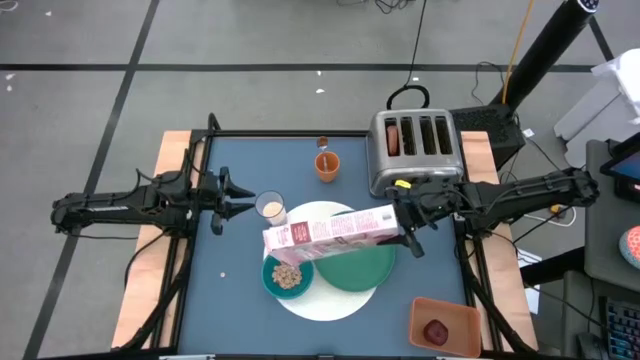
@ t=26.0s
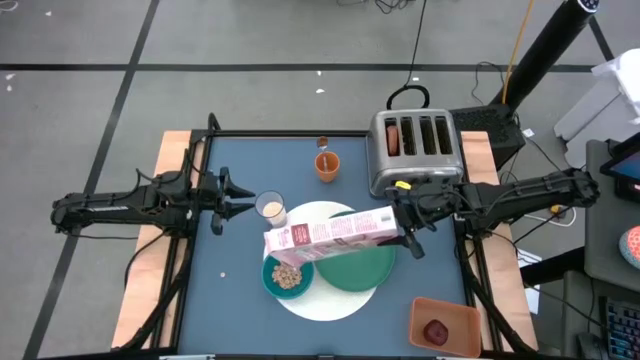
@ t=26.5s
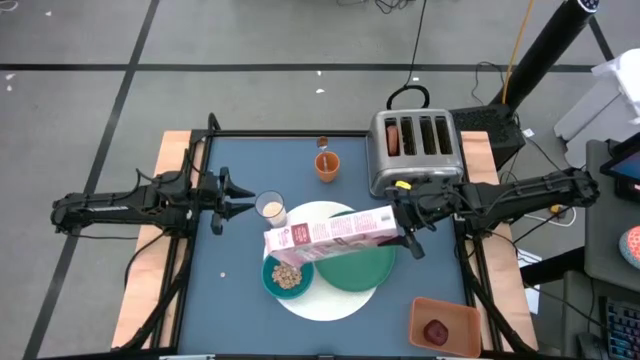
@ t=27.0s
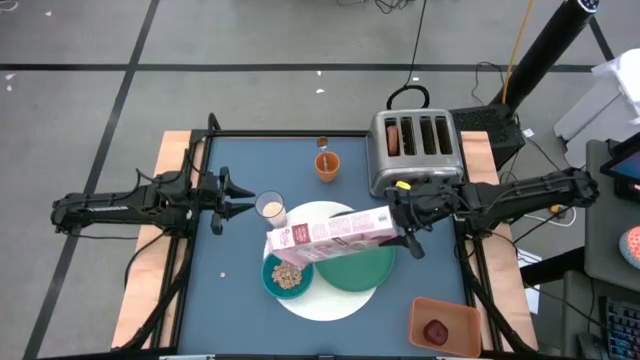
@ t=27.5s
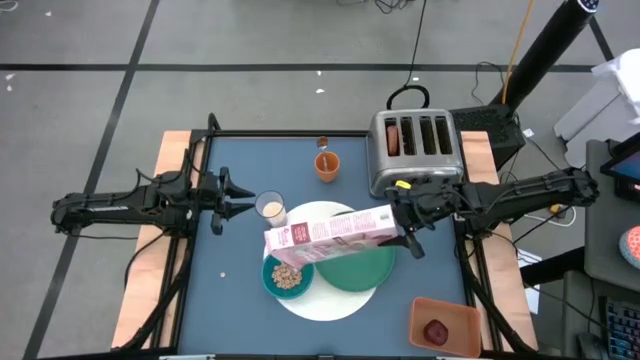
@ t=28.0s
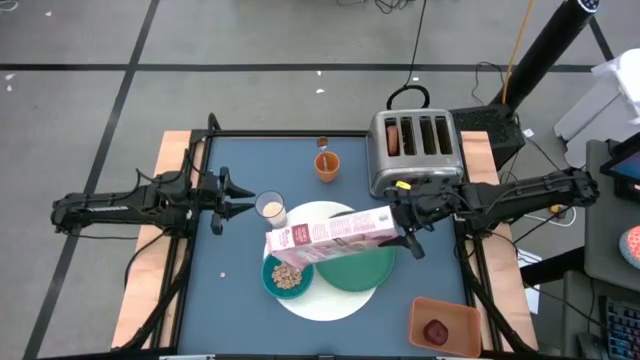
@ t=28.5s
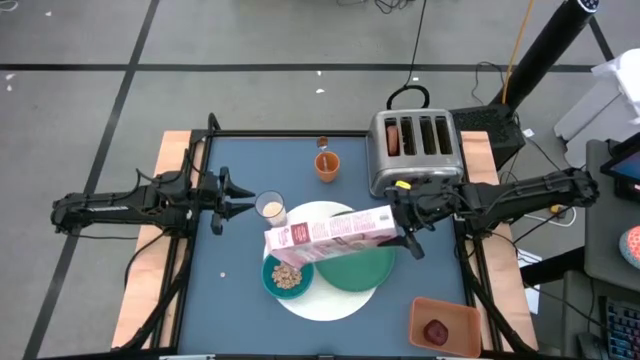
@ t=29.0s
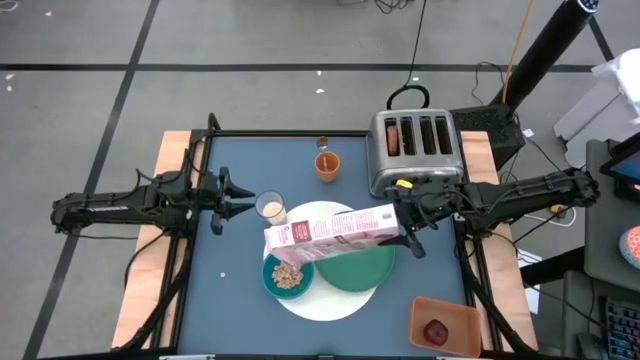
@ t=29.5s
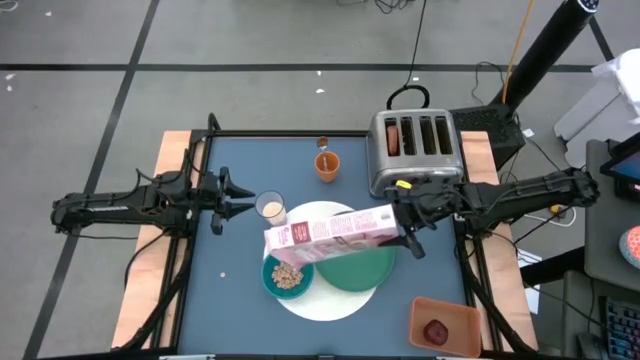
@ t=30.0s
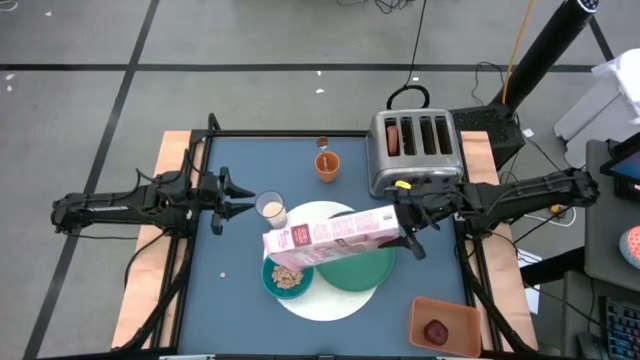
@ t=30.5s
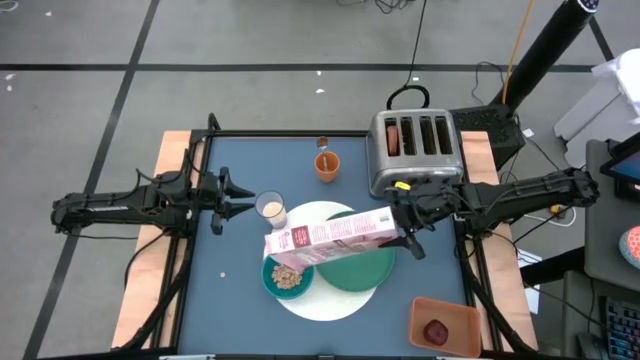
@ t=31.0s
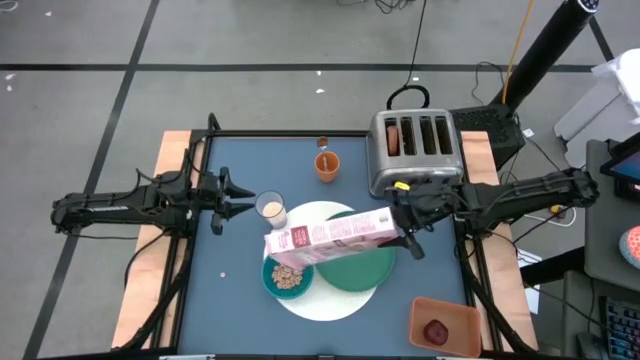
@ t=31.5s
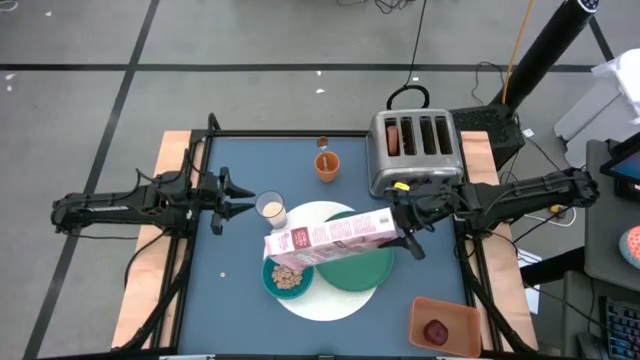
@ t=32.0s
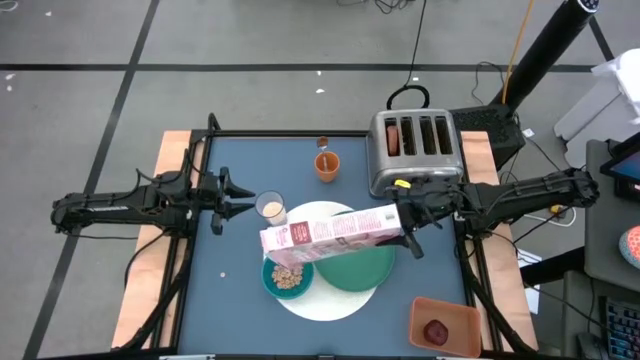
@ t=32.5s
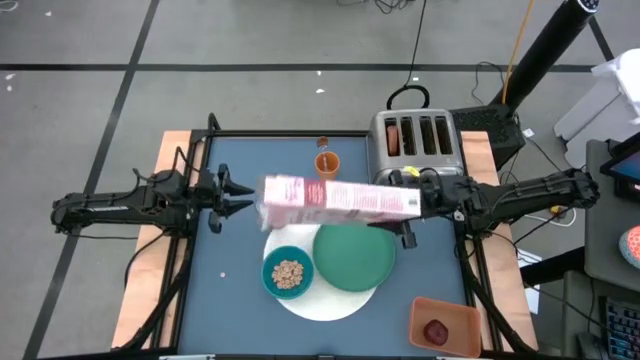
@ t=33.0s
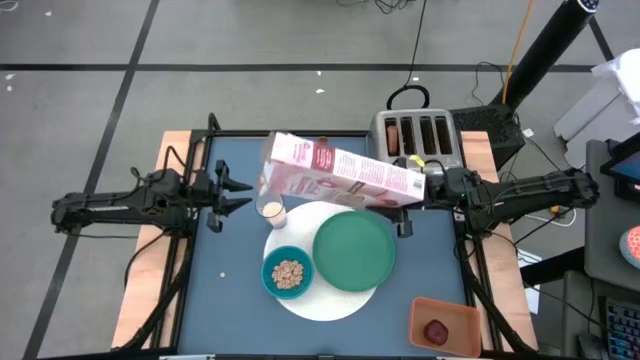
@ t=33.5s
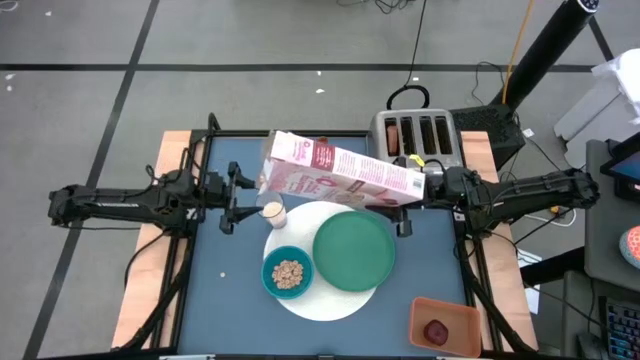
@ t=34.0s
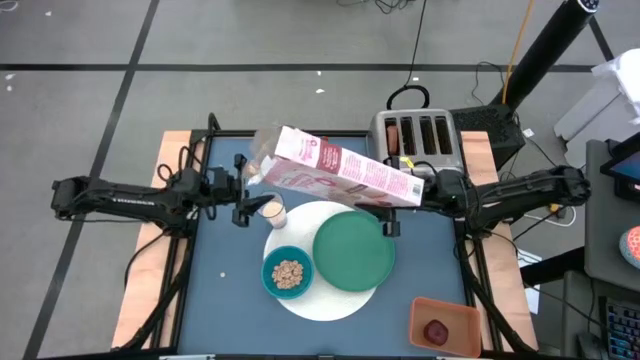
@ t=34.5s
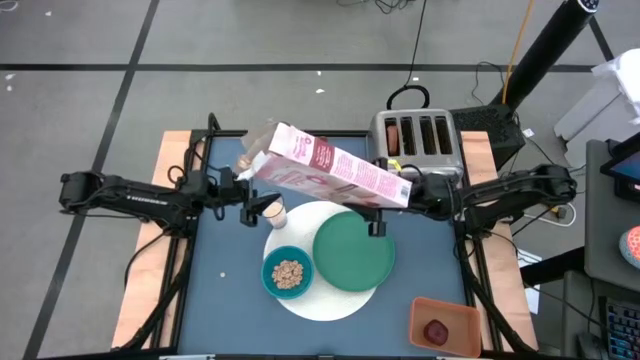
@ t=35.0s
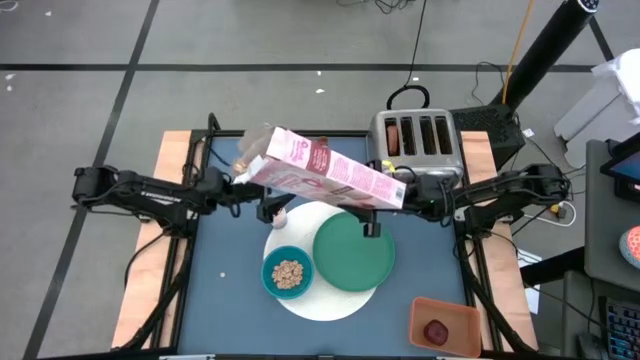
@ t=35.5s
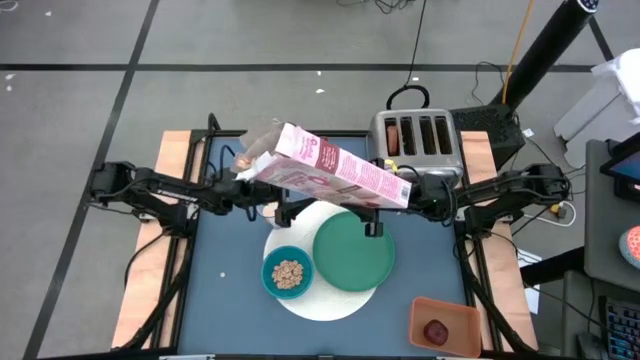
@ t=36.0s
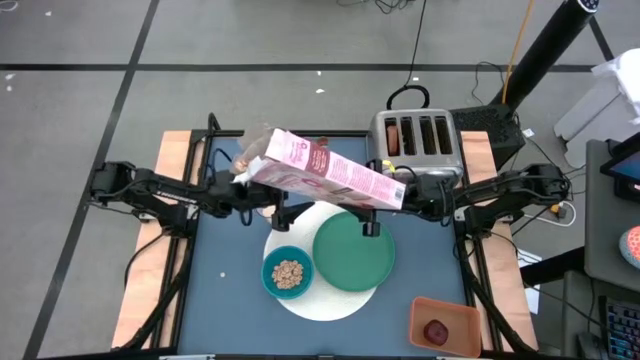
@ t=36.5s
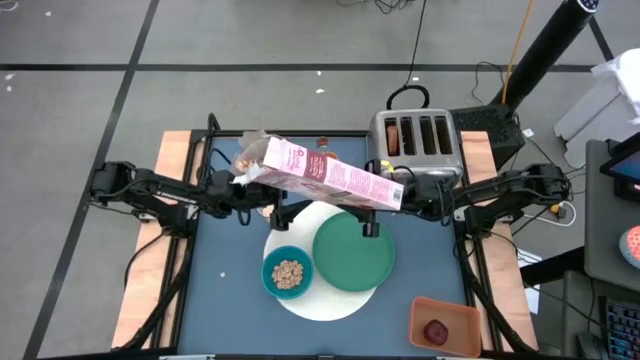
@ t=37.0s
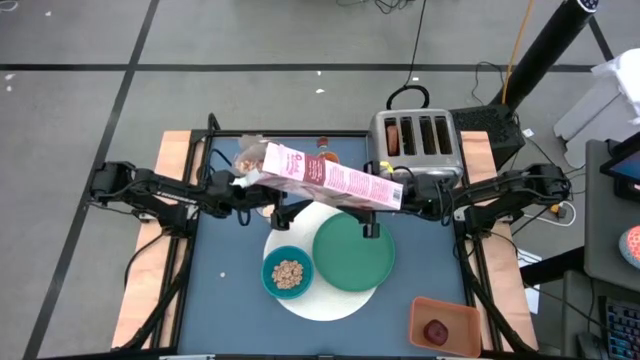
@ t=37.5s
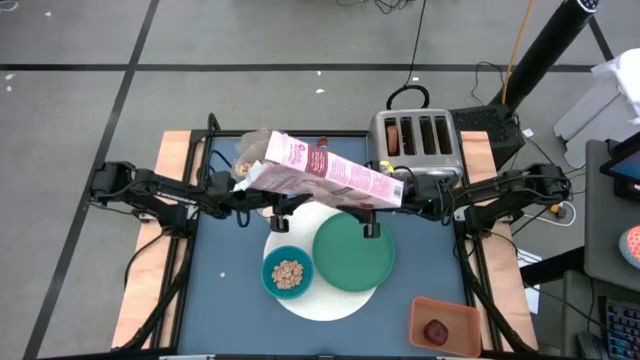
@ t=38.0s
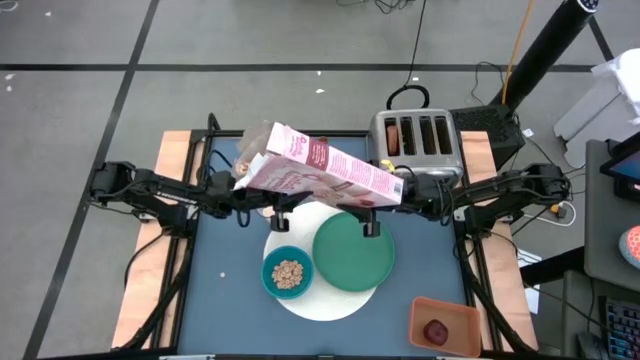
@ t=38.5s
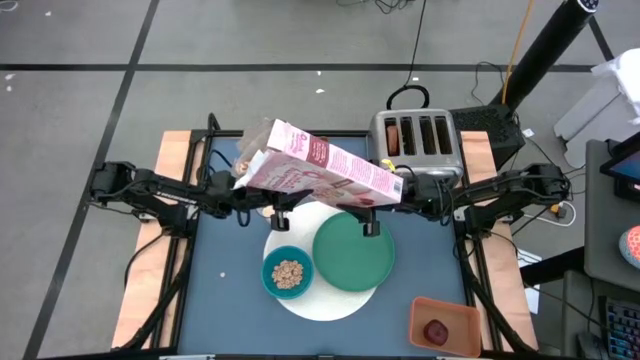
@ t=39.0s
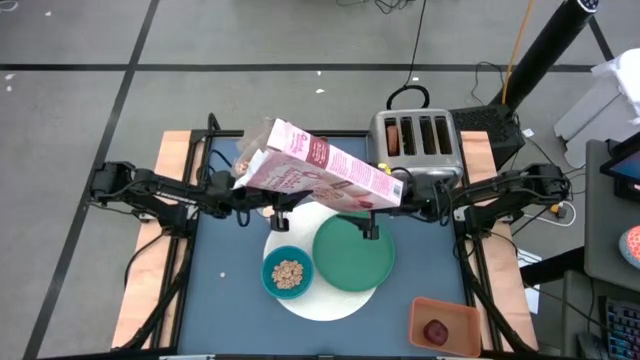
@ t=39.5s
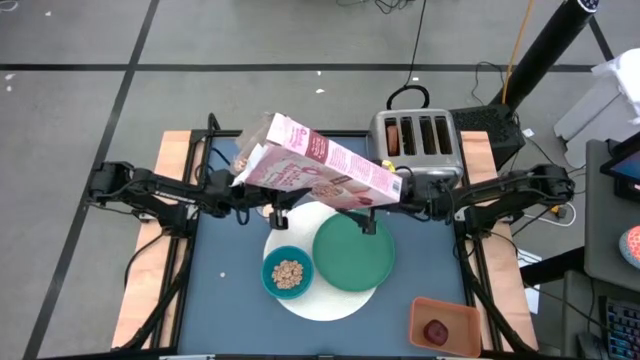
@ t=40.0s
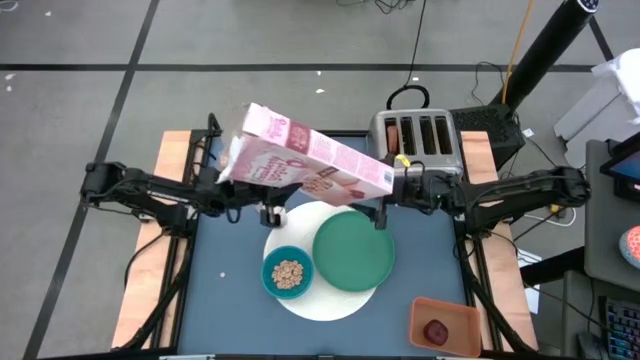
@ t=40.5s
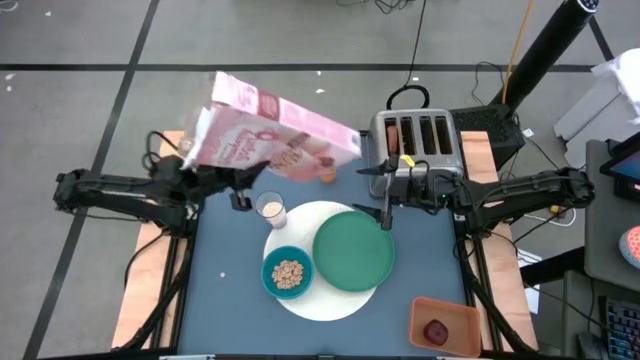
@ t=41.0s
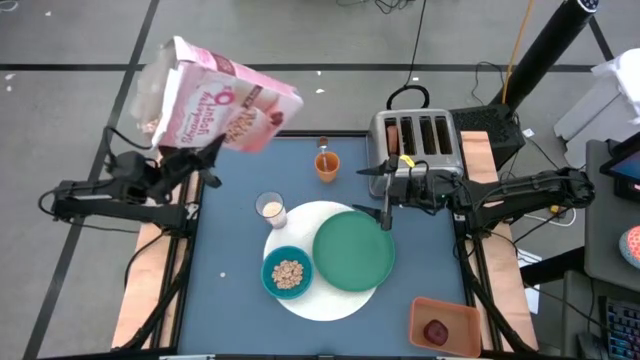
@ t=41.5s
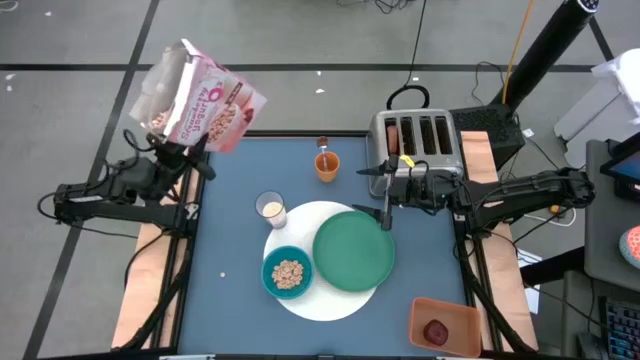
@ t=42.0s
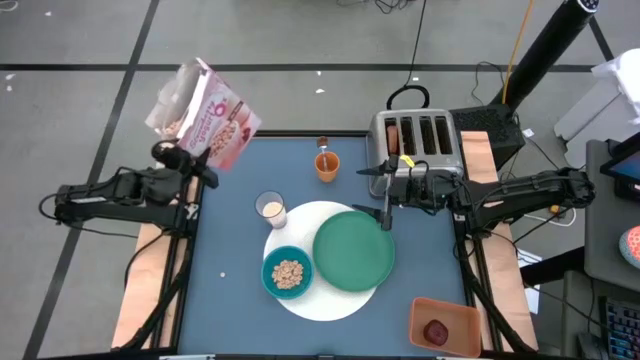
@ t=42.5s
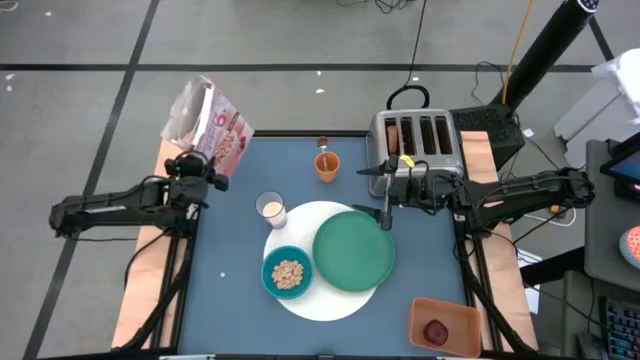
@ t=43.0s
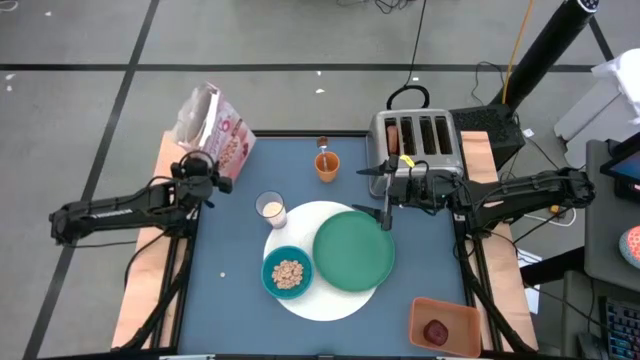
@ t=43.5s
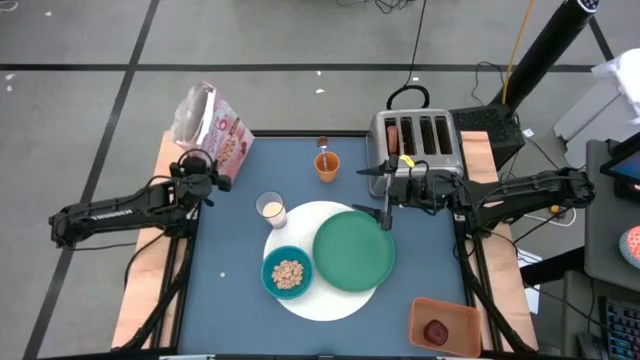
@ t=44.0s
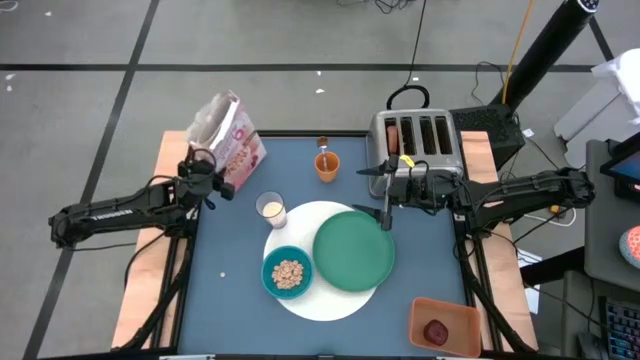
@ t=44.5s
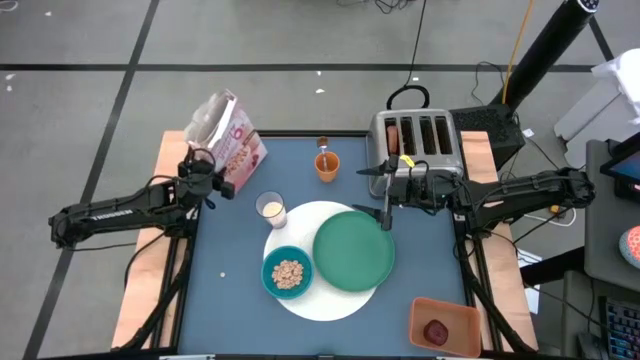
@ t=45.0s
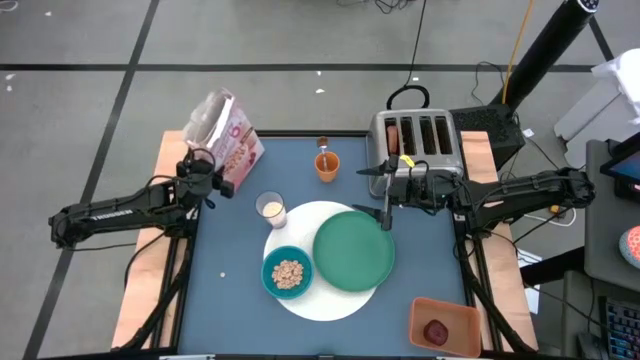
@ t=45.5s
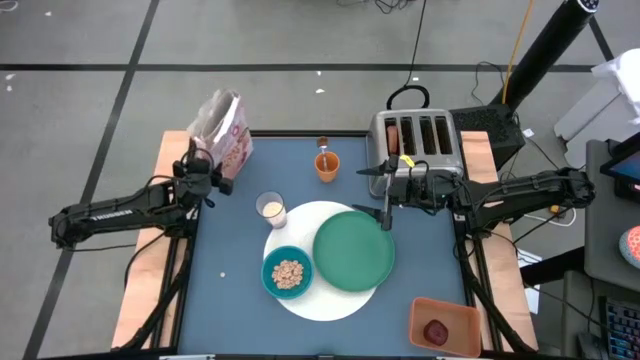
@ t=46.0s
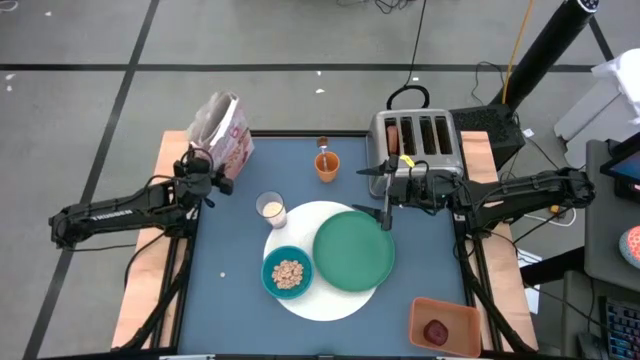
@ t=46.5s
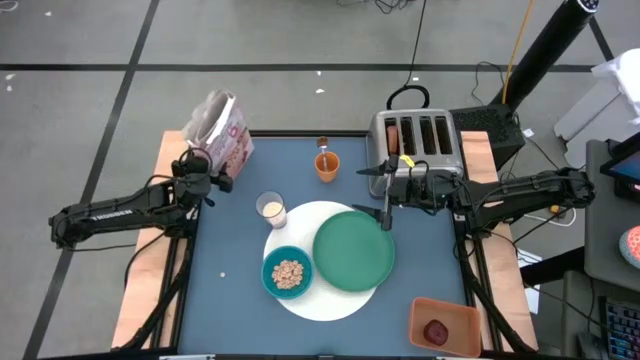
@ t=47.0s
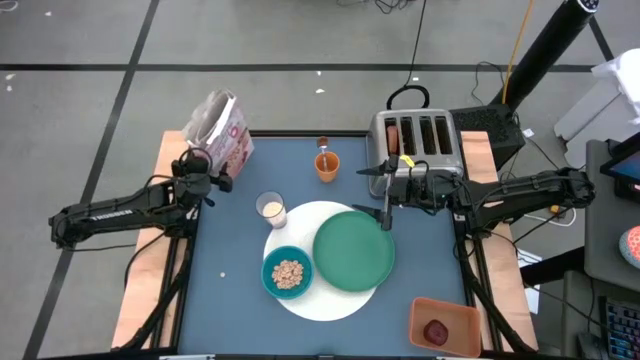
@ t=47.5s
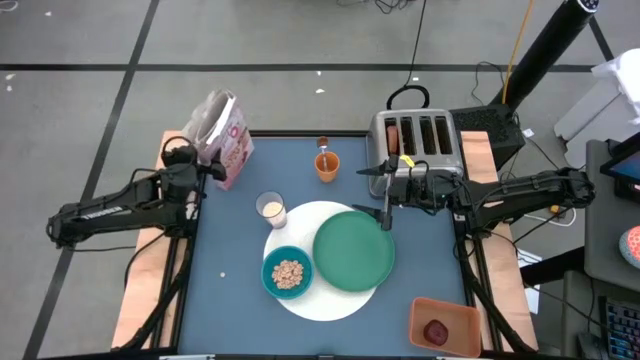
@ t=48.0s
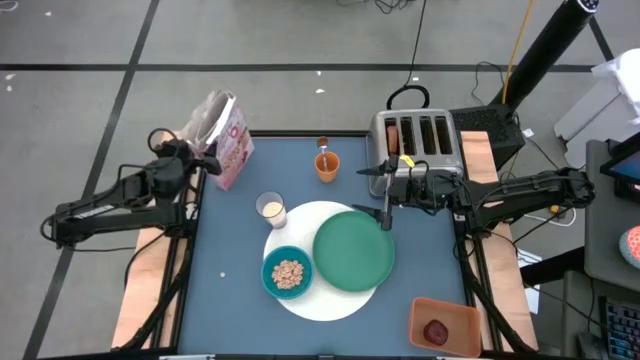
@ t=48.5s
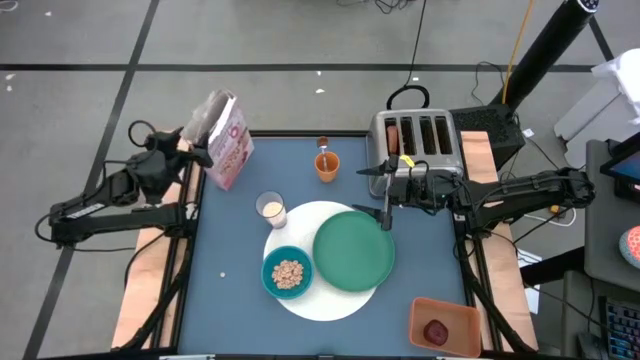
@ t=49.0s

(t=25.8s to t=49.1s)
Task: Arrange a breakfast setting
Pour the cereal from the cereal box into the blue bowl
